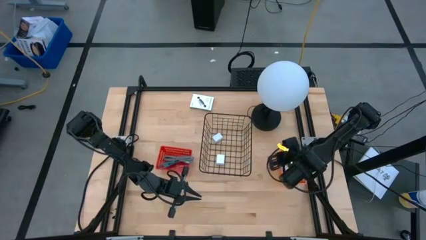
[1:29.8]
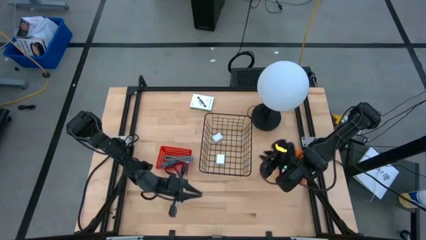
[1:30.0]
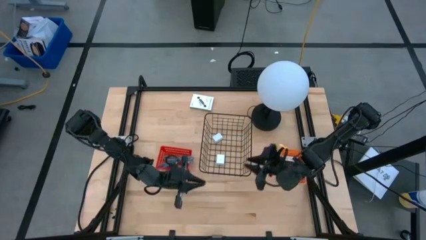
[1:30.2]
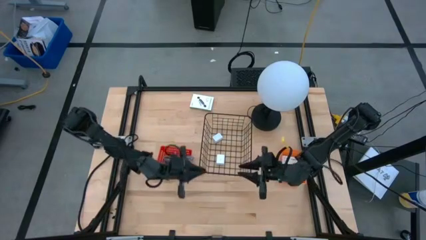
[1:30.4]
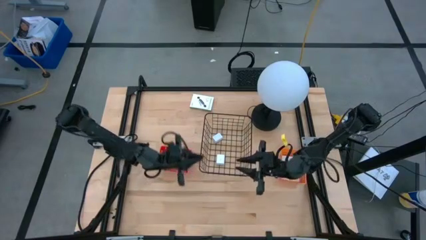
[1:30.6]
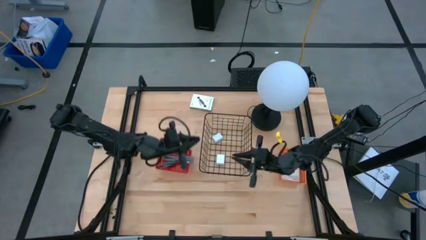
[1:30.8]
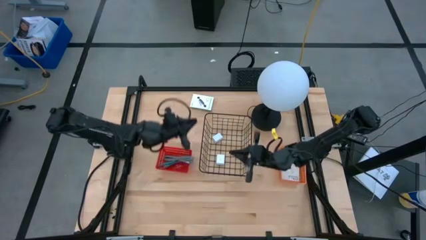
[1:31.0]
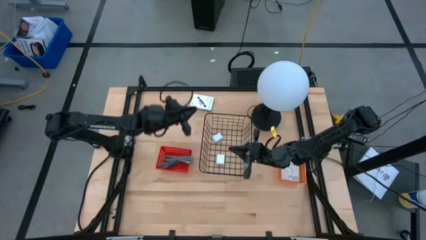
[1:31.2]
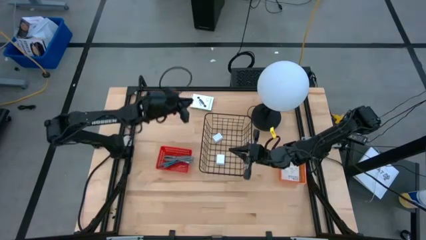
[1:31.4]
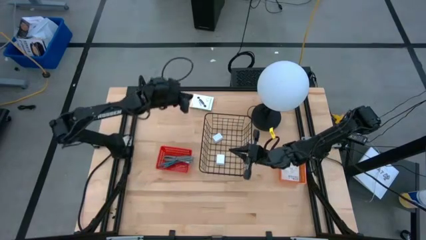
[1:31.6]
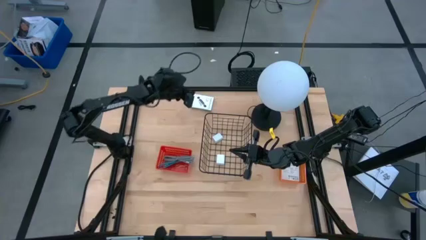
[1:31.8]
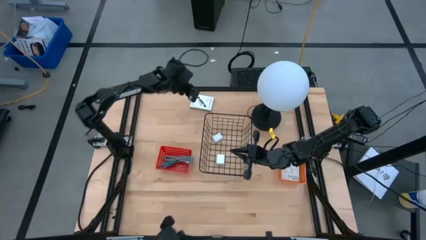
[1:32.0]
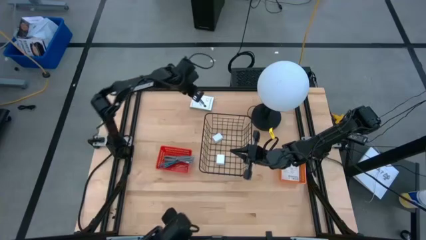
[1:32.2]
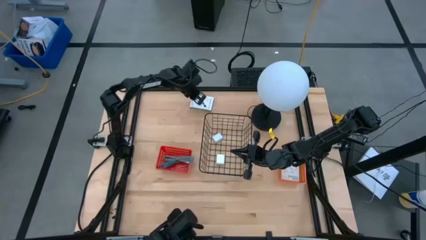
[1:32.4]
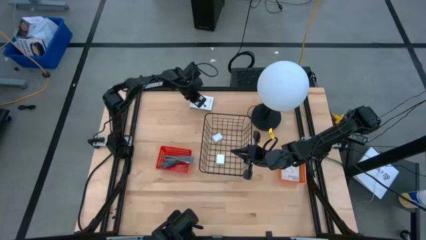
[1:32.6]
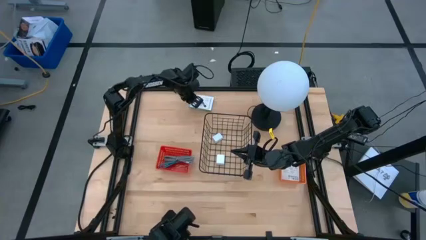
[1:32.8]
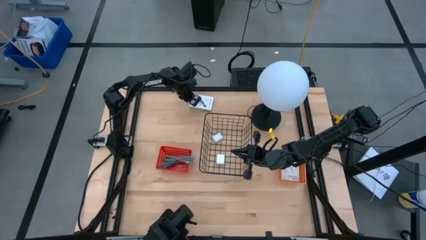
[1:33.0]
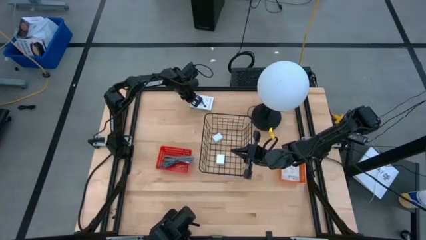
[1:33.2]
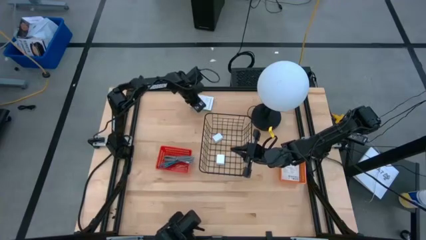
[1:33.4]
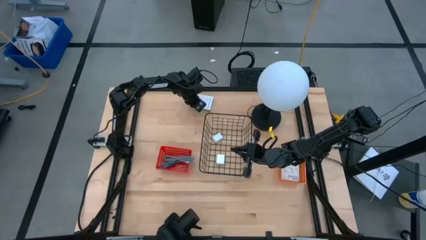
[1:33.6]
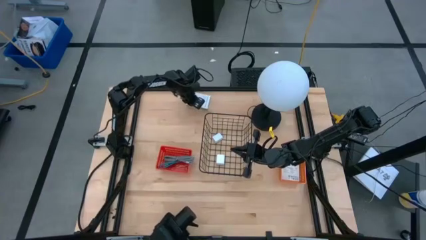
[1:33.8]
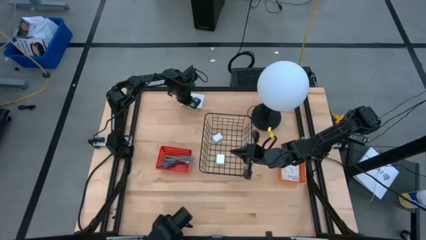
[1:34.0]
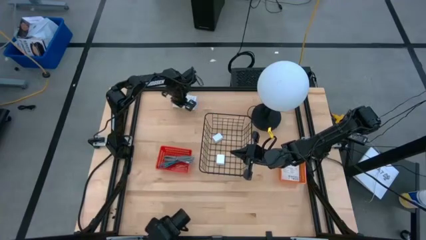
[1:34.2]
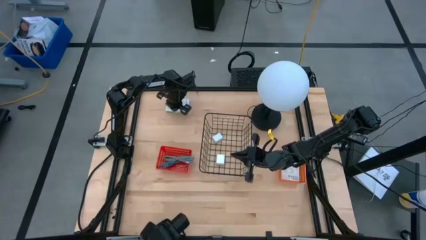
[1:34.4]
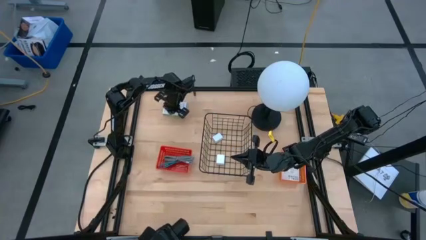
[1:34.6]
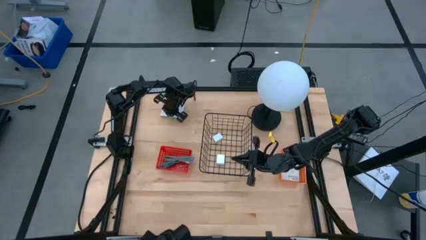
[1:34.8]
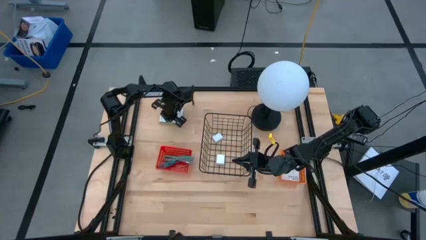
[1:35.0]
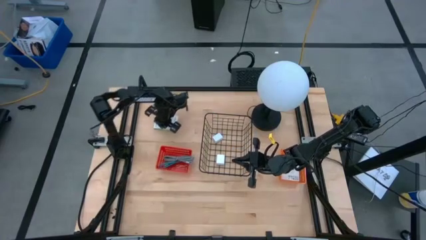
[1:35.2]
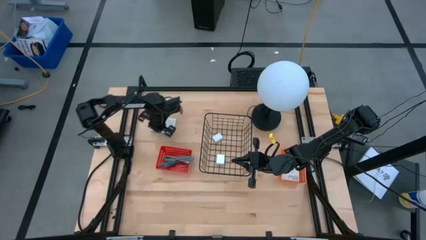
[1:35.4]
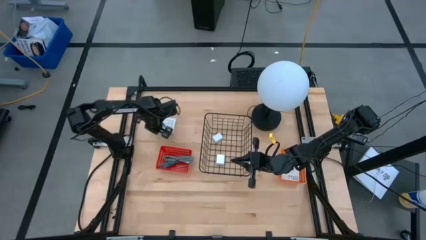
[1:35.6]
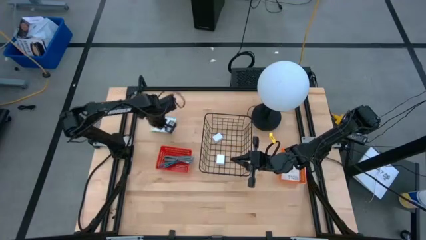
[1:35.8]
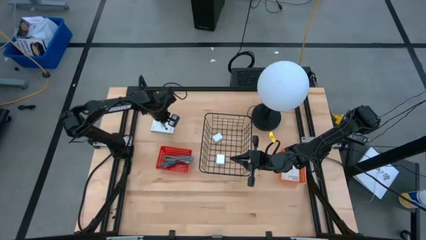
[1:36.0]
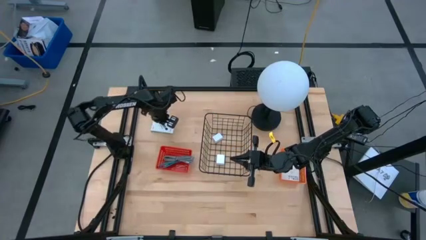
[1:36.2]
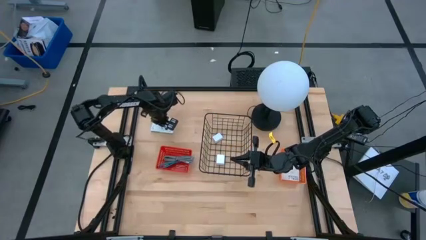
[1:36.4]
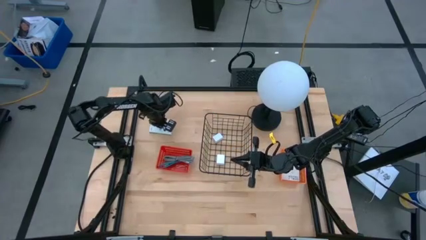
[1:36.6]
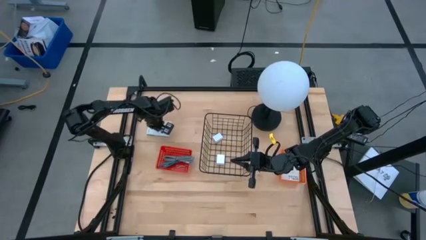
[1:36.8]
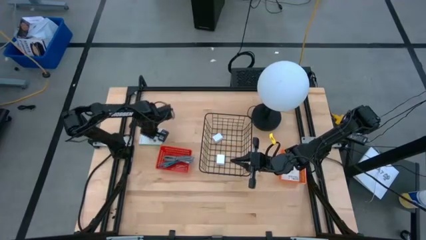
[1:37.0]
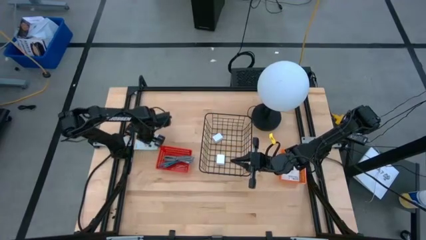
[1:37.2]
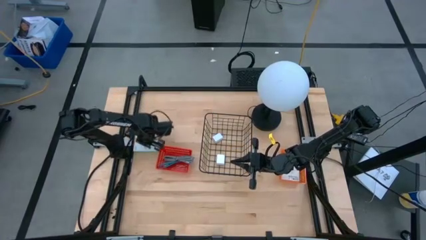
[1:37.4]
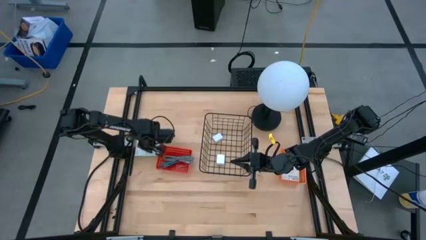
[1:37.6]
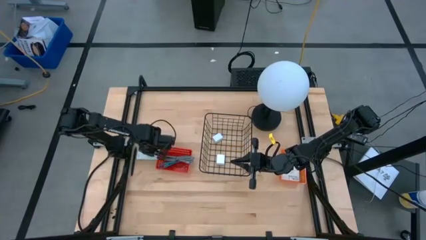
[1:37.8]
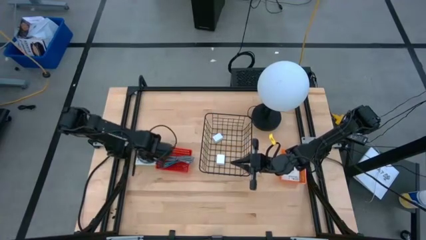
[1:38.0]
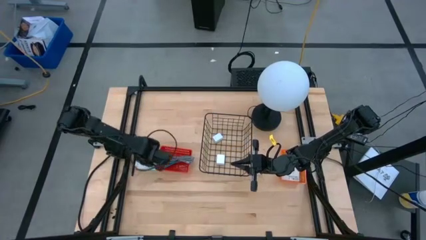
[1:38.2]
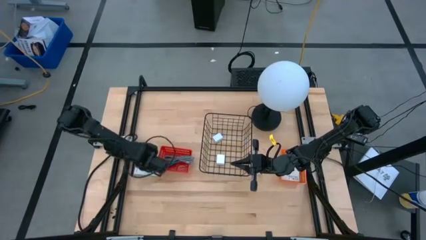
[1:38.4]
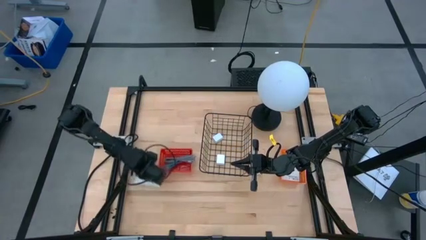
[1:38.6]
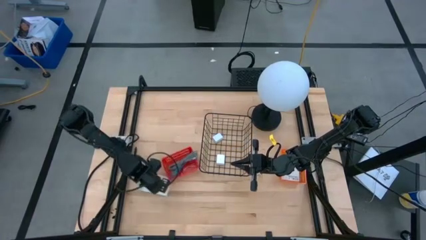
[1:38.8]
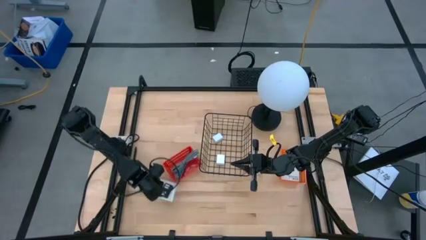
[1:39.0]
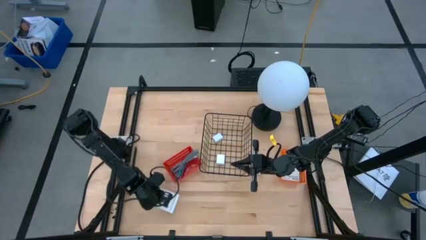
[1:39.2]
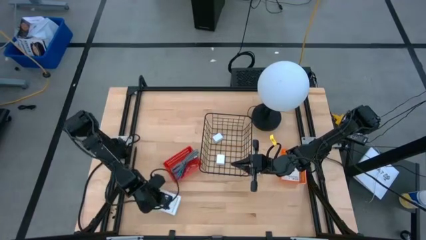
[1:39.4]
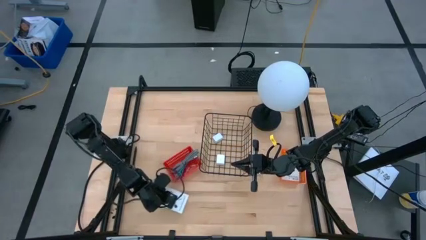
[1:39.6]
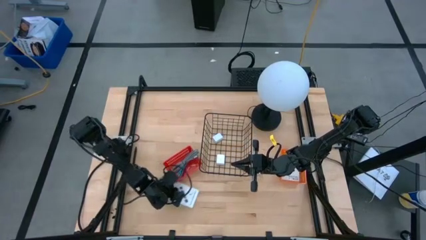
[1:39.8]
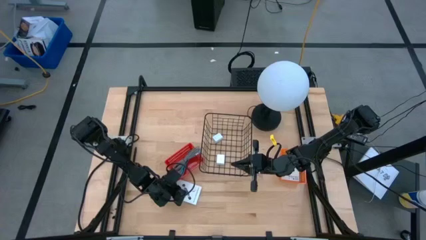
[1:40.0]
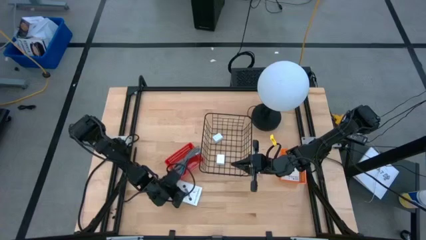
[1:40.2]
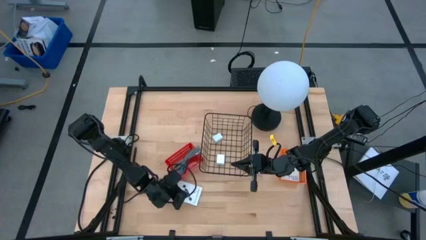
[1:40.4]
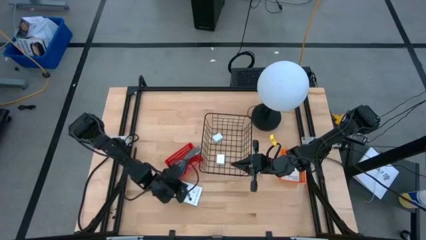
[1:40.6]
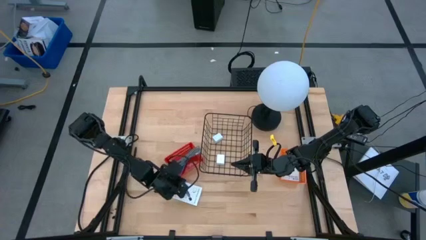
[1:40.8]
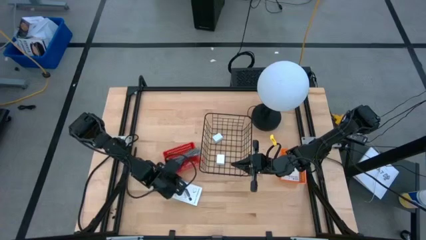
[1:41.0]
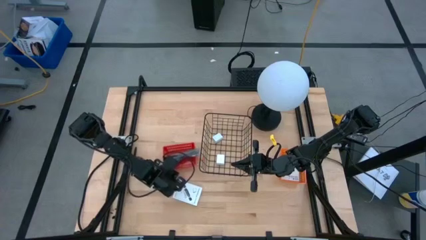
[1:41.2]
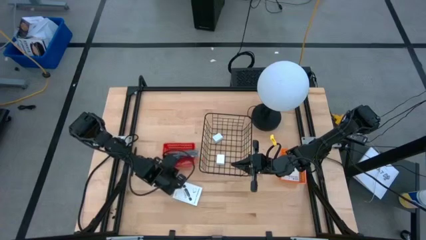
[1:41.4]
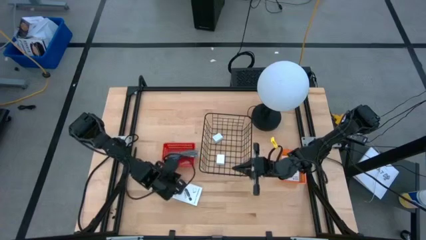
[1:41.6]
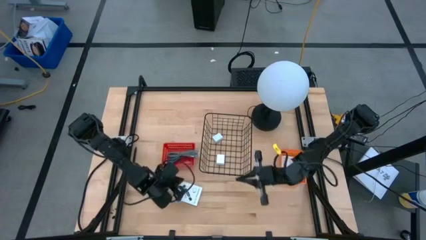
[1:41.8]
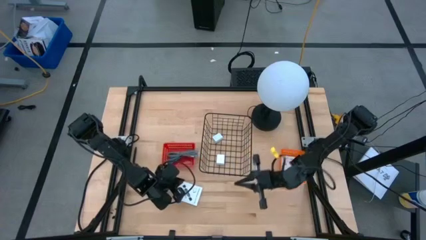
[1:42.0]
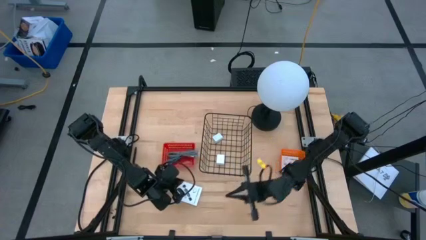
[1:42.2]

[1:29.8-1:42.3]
Task: Pick and place items into bin
Put the card reader box into the orange basket
